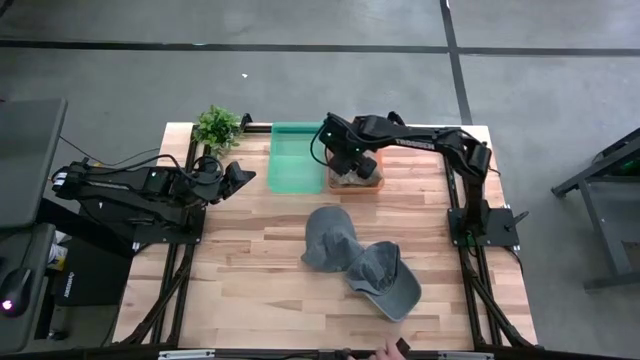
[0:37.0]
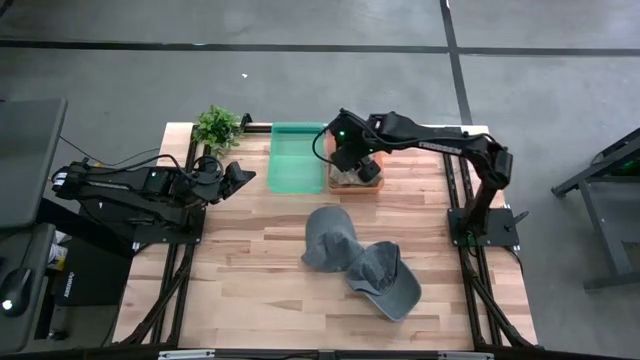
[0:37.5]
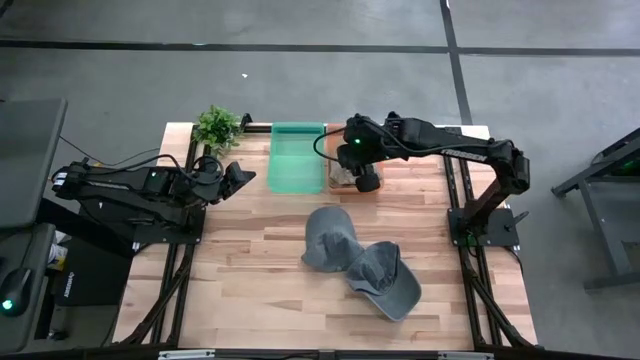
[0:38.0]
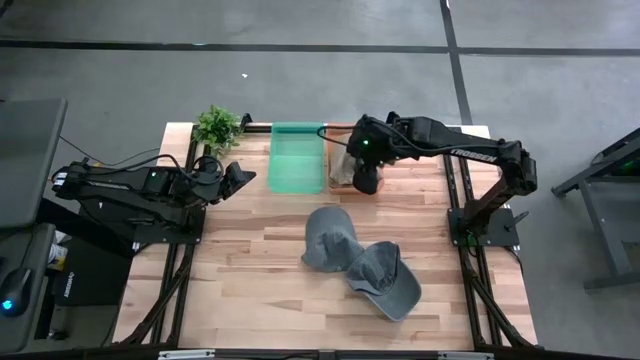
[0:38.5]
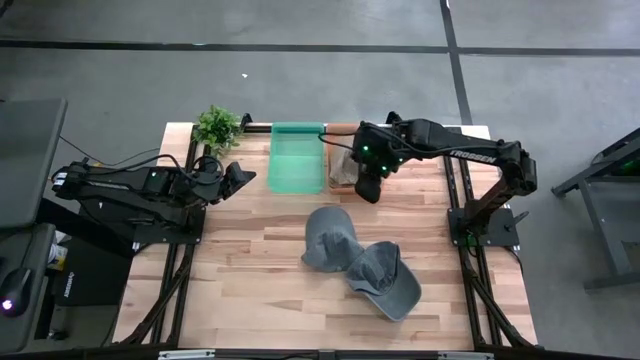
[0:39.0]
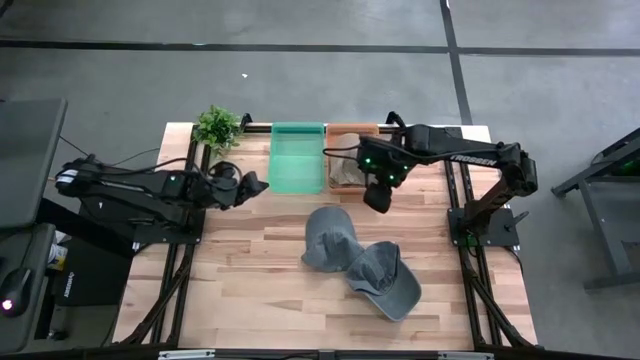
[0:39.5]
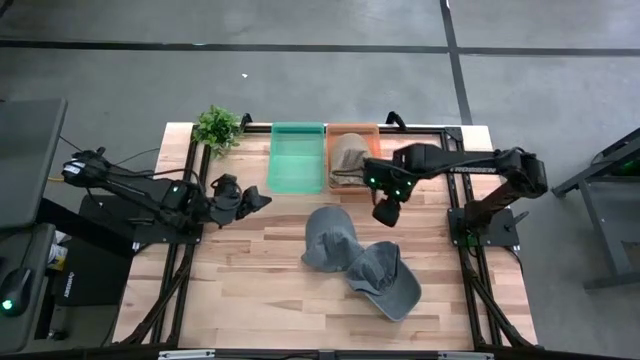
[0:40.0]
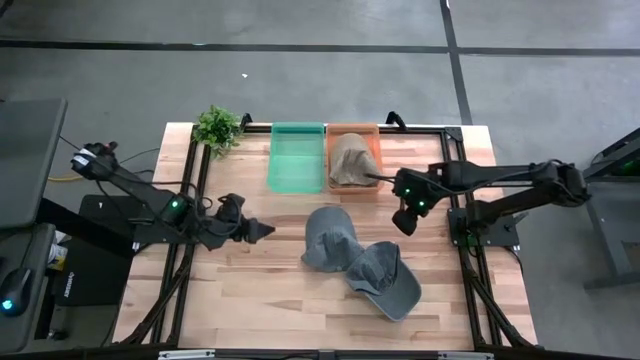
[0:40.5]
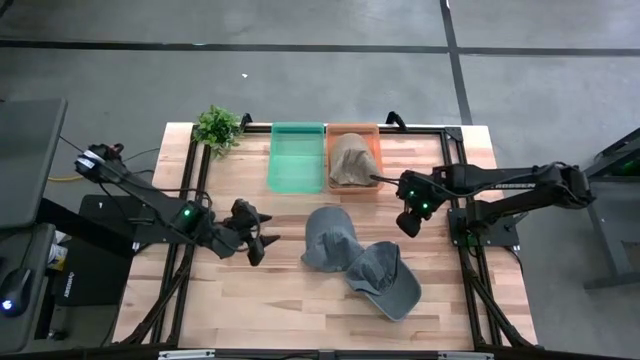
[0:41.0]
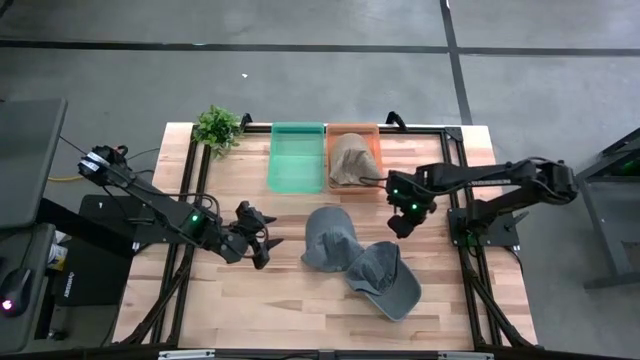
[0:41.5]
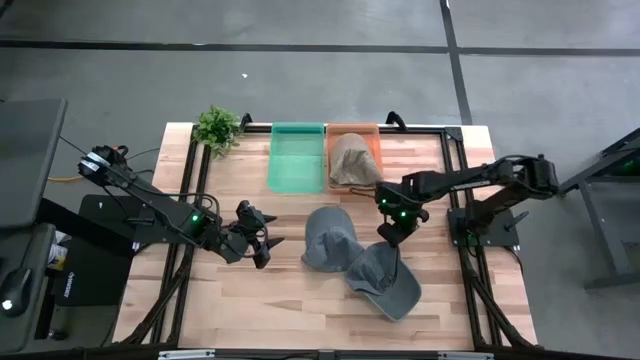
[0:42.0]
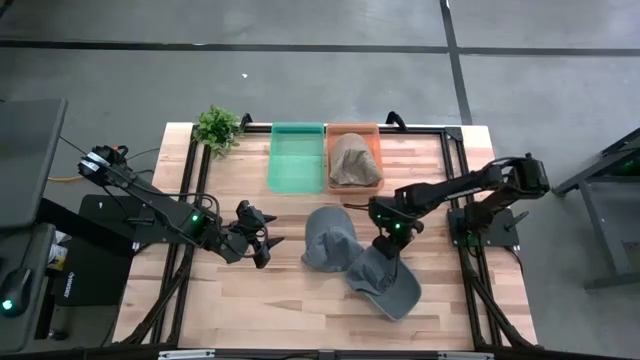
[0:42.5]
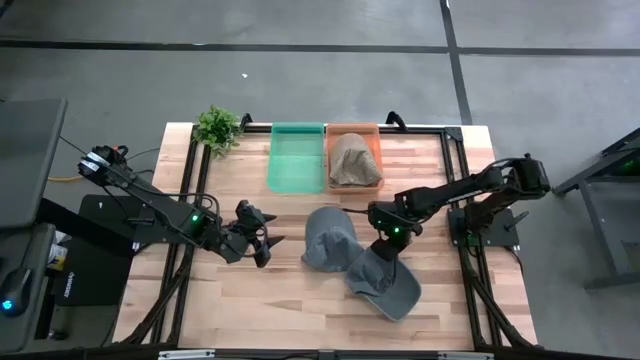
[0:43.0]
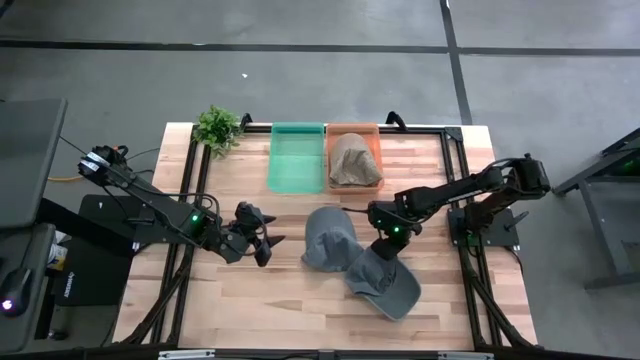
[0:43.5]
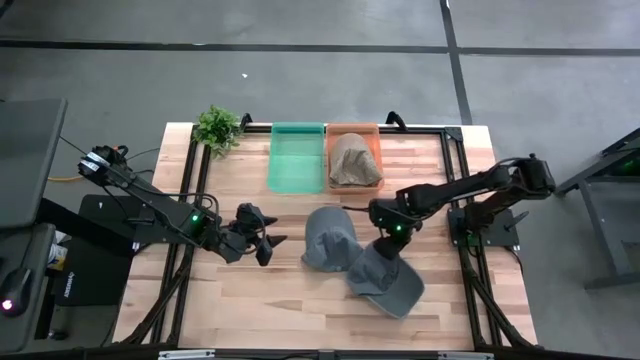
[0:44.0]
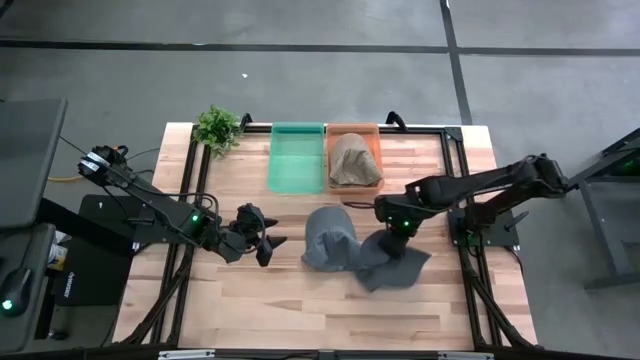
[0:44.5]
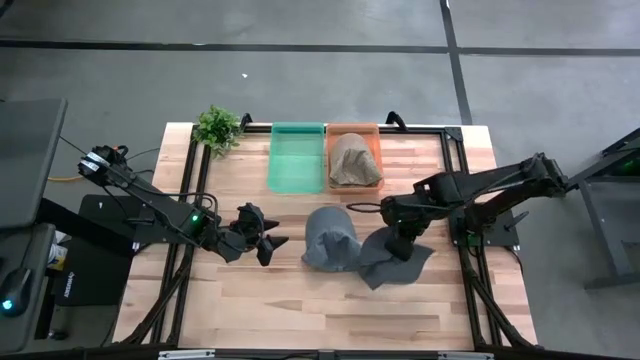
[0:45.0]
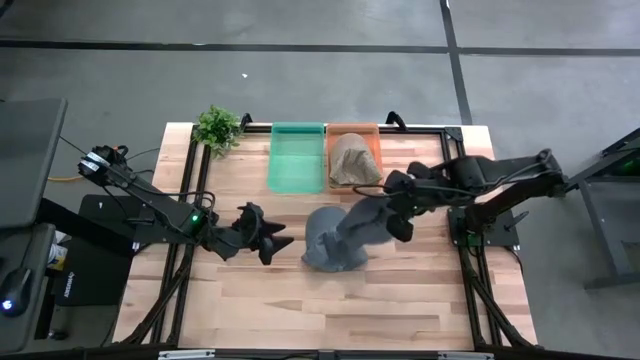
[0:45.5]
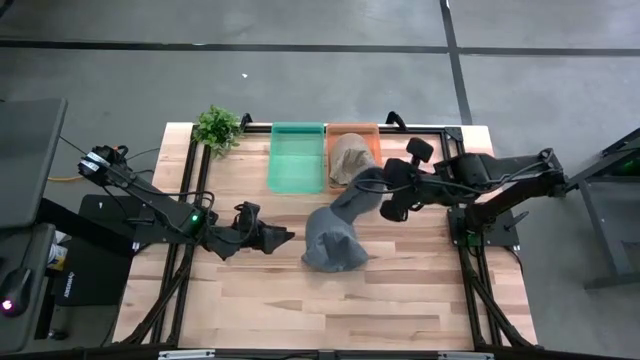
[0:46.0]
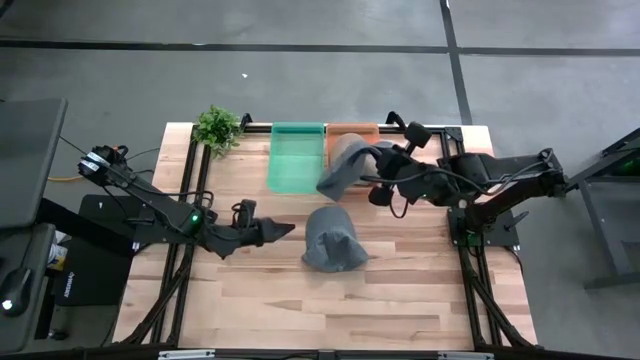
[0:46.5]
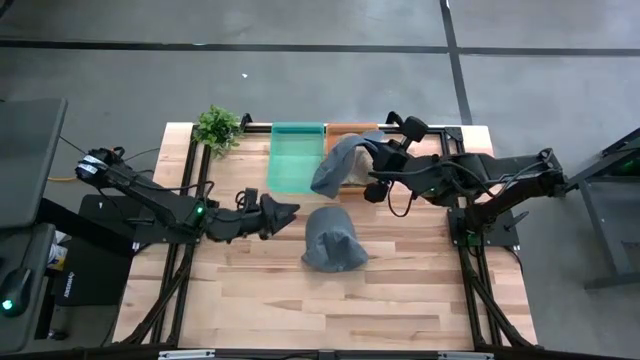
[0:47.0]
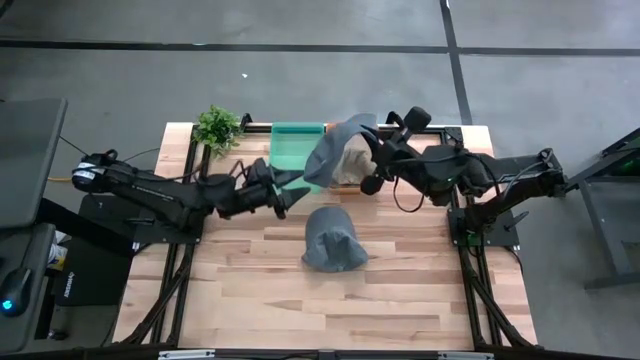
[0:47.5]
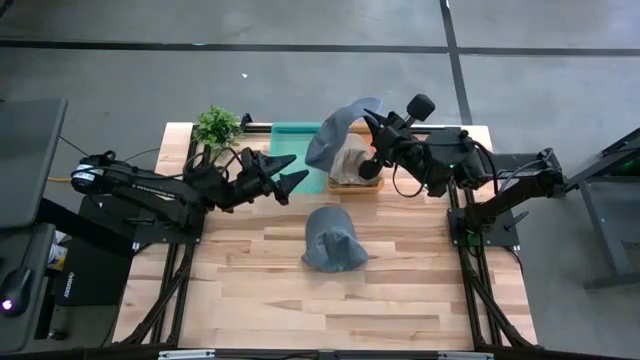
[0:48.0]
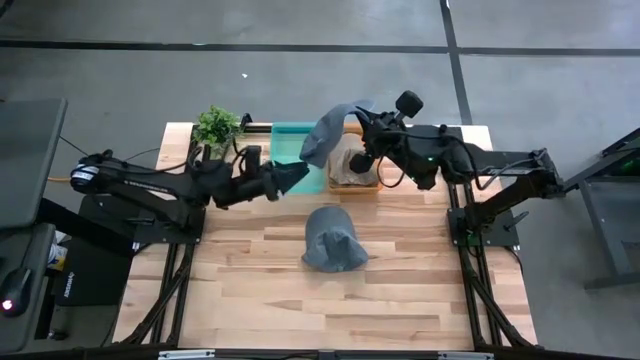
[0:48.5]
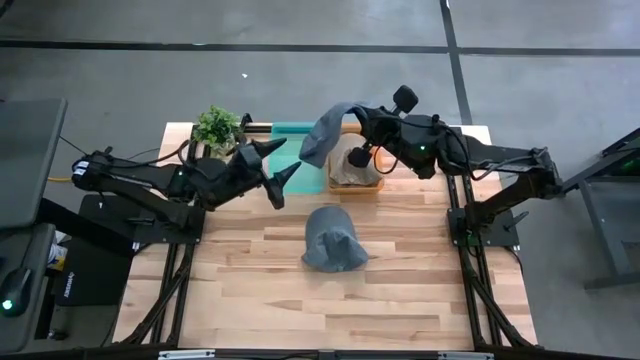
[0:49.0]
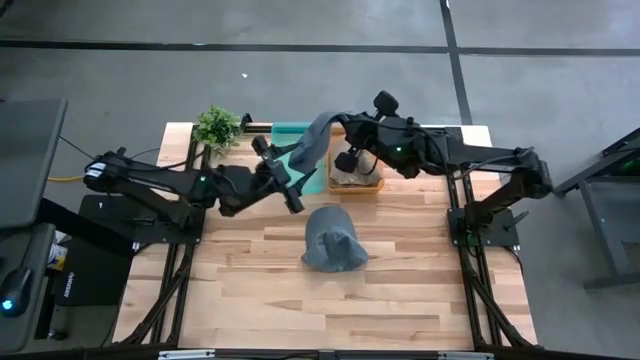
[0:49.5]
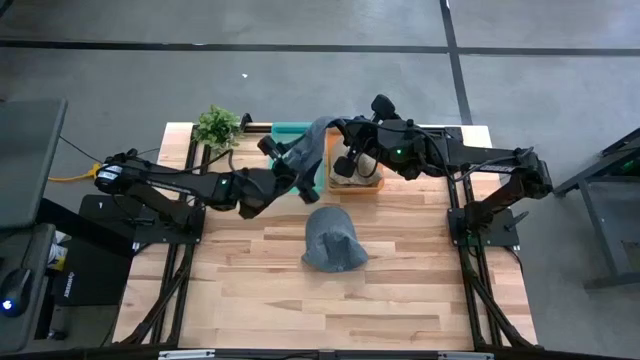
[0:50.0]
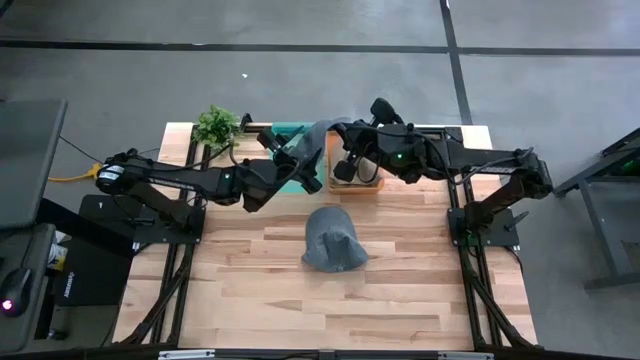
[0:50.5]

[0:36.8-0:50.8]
Task: Pick & Place hat
Put the bottom blue cap into the green bin

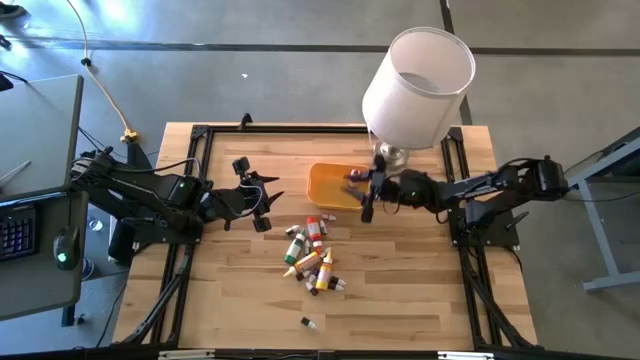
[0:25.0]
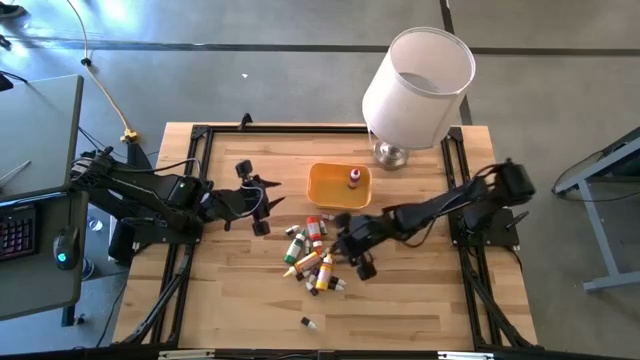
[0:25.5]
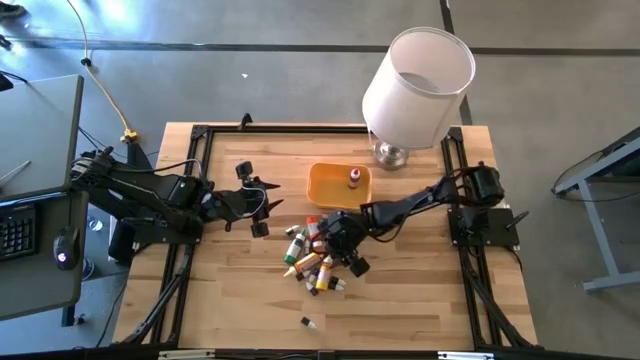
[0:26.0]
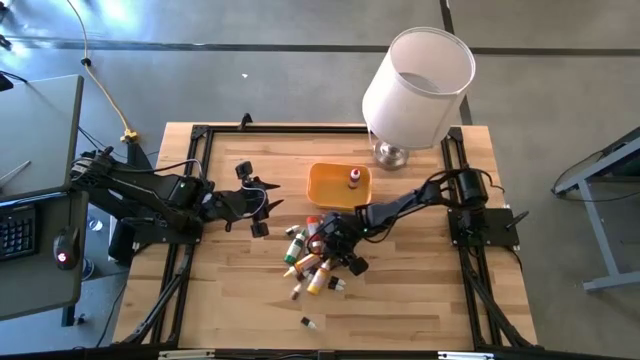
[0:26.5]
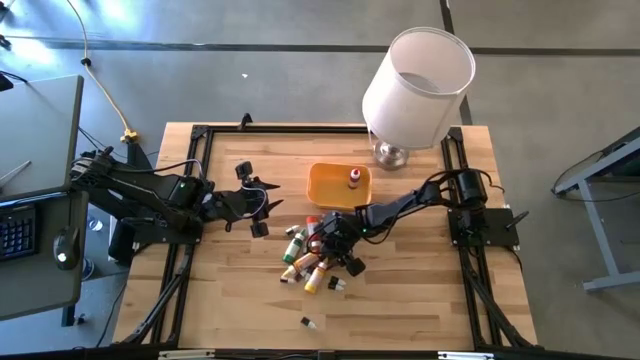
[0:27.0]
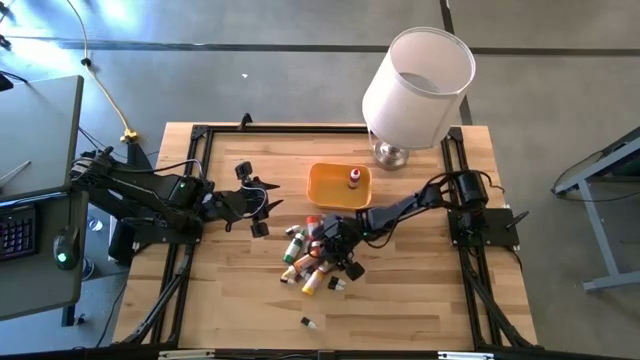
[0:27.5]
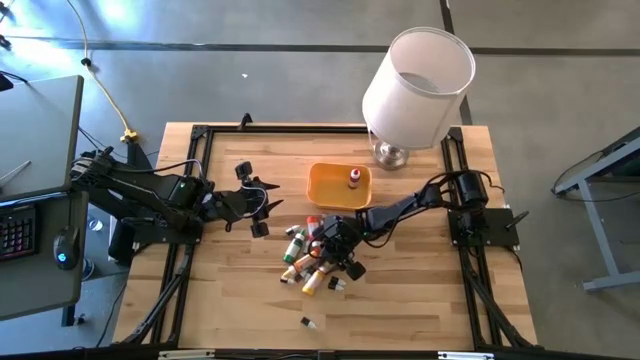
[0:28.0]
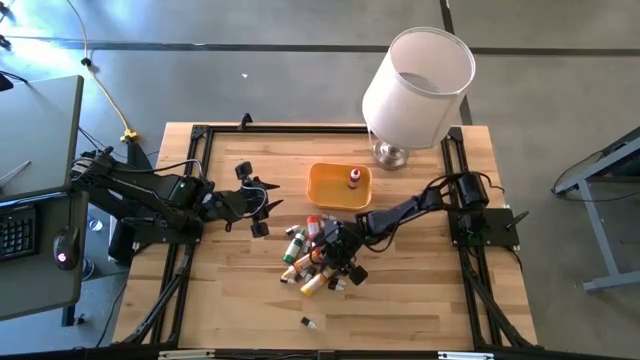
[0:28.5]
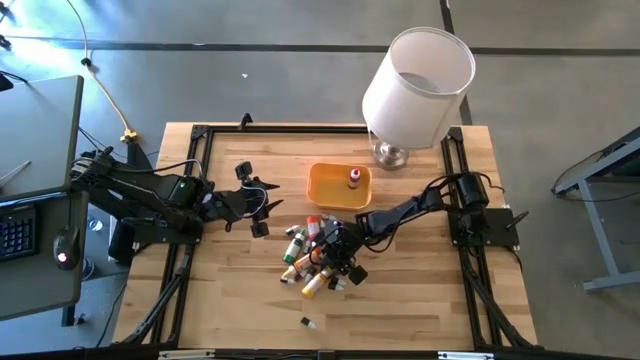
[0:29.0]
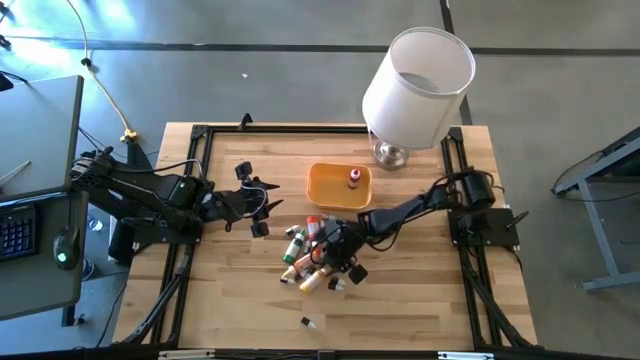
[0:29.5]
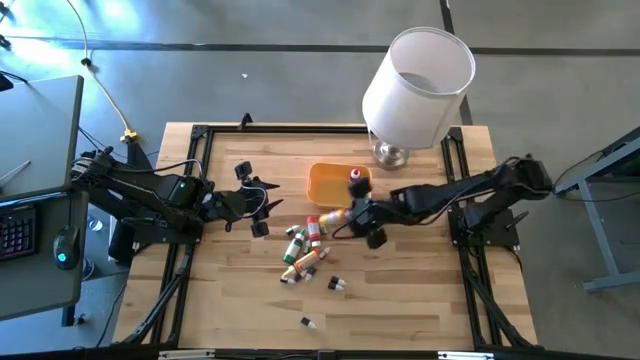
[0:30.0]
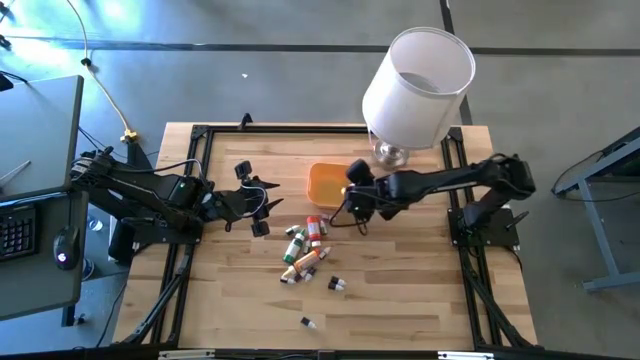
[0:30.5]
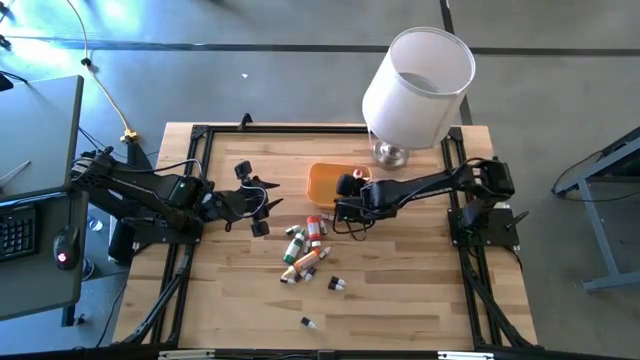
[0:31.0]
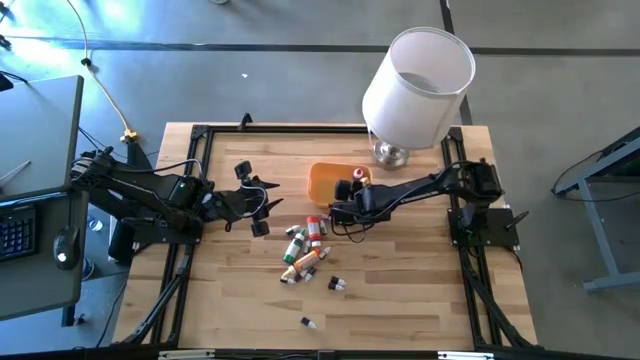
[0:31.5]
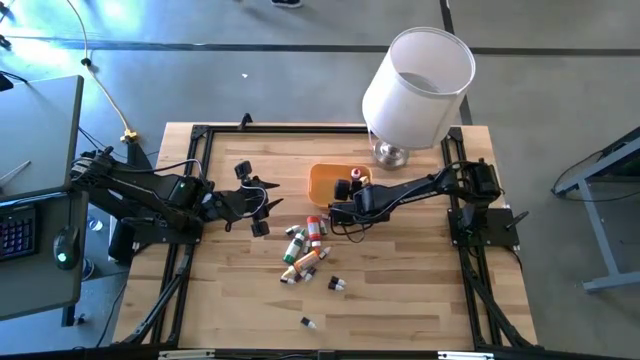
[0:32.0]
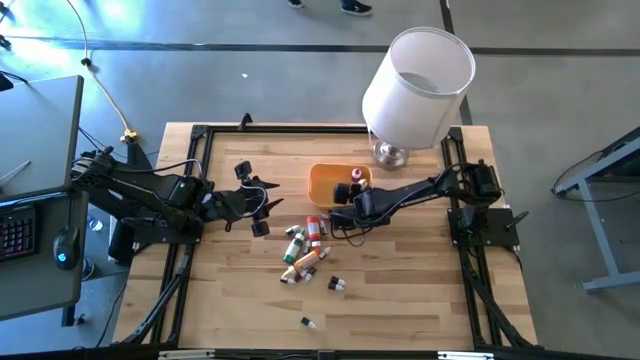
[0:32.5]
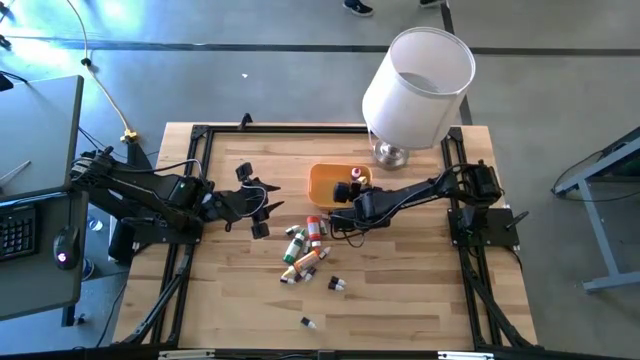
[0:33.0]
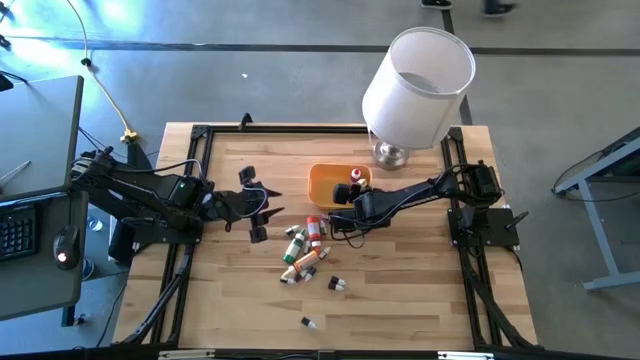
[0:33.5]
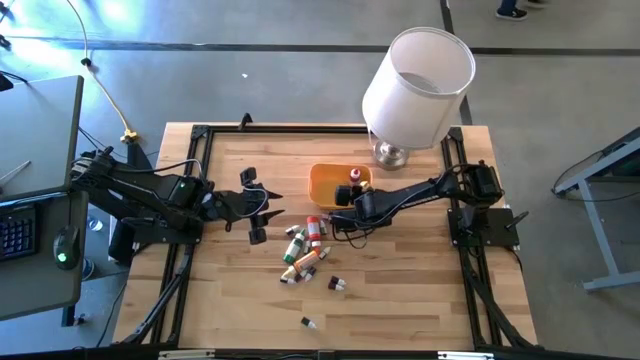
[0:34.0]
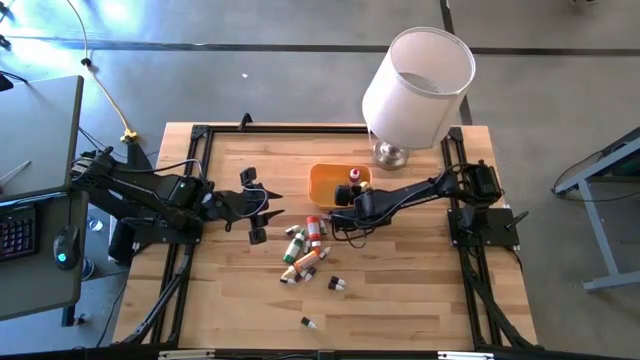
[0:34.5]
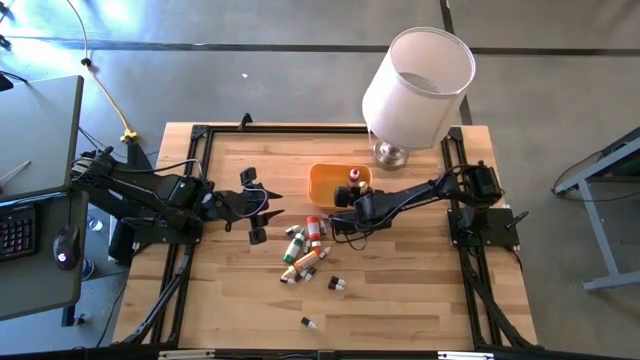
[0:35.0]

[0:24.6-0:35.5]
Task: Pick & Place food coloring
Put the large yellow food coloring bottle into the yellow container
